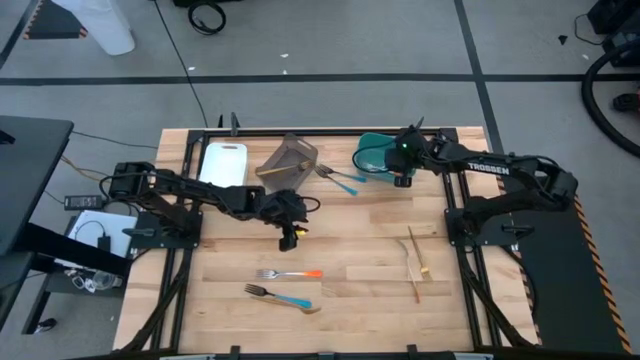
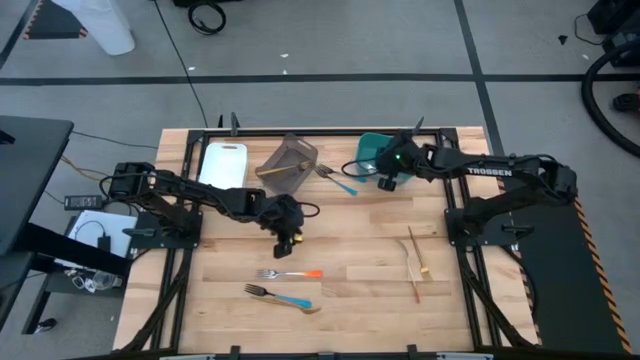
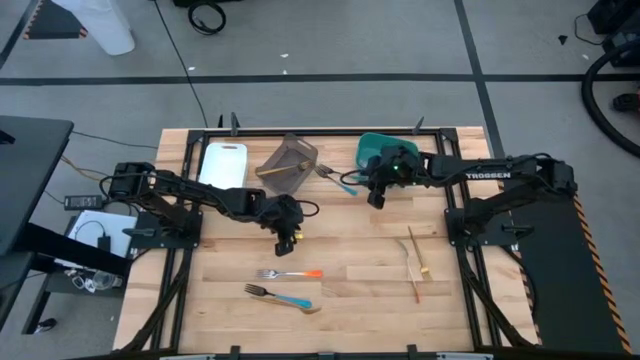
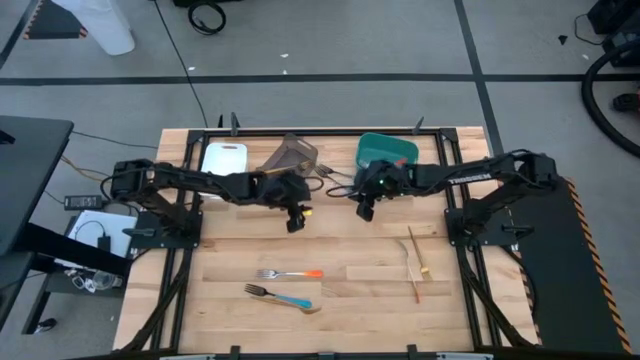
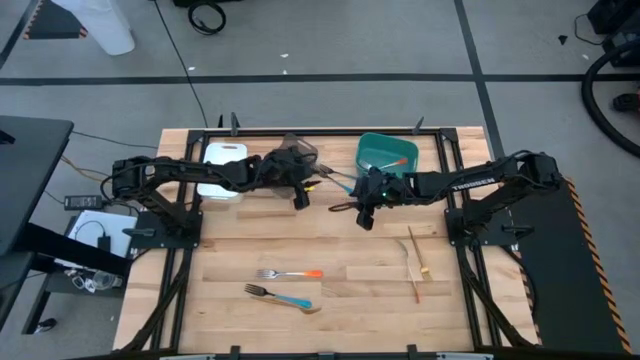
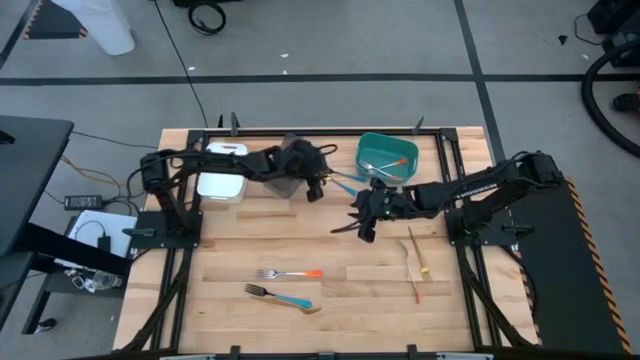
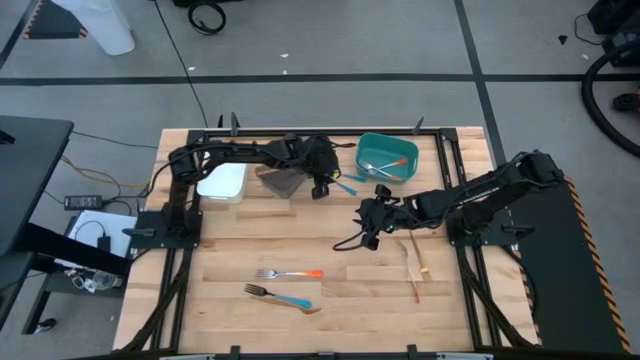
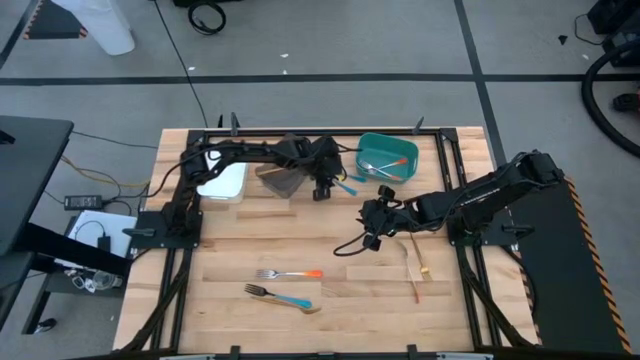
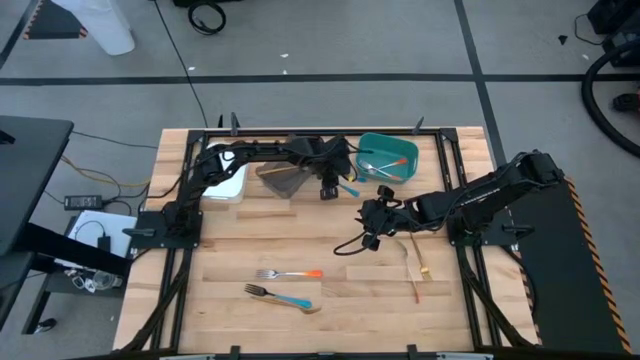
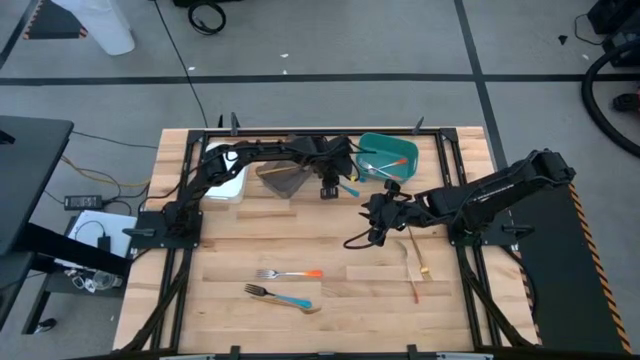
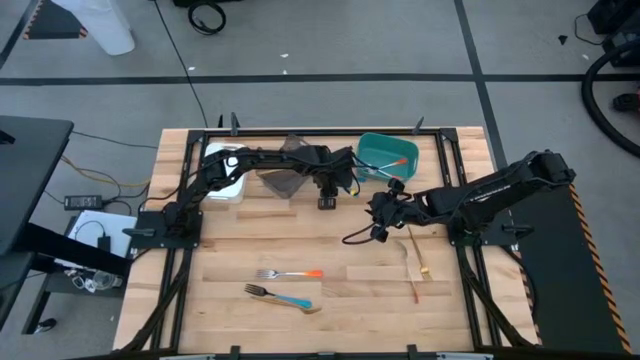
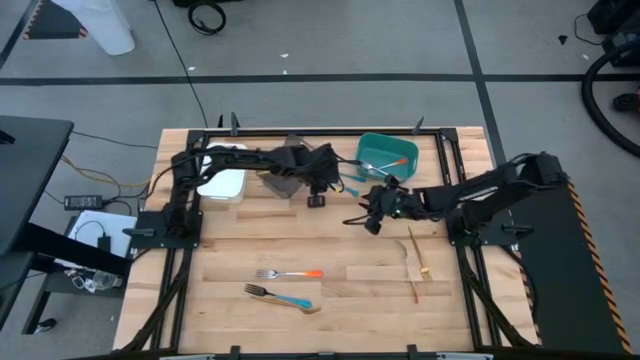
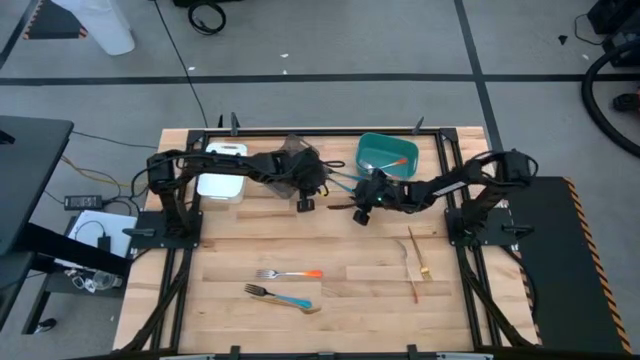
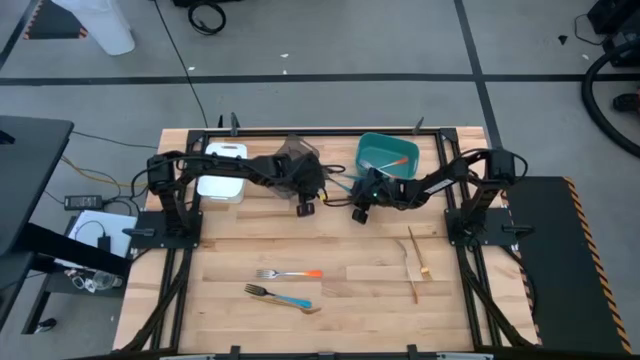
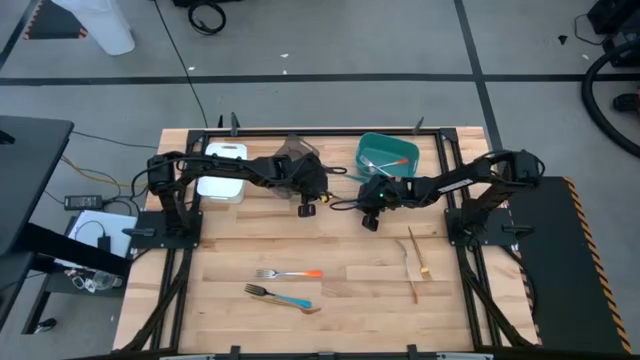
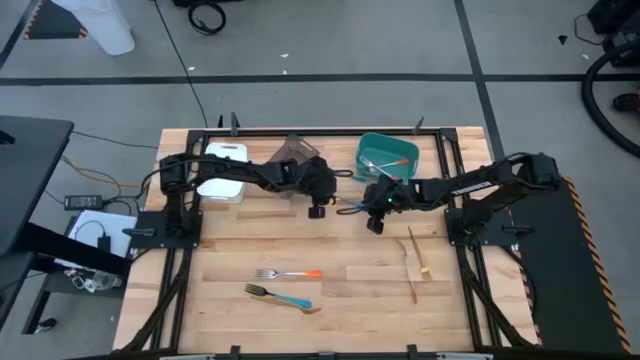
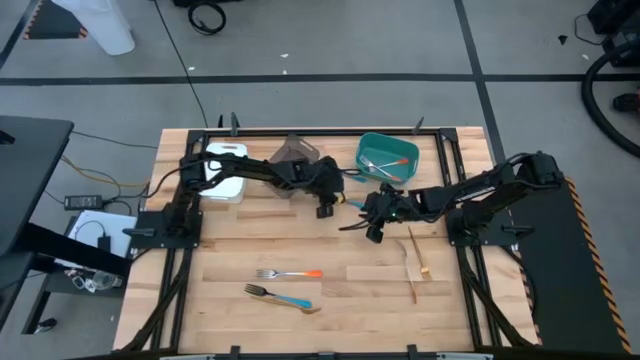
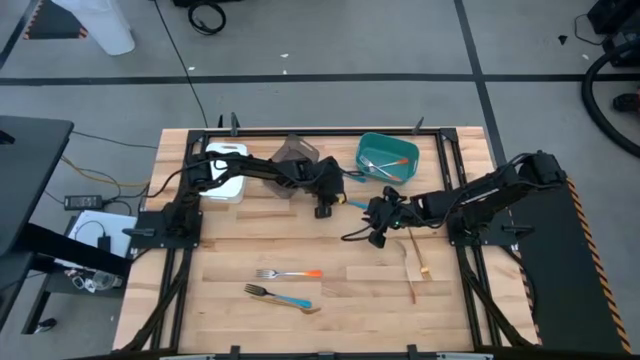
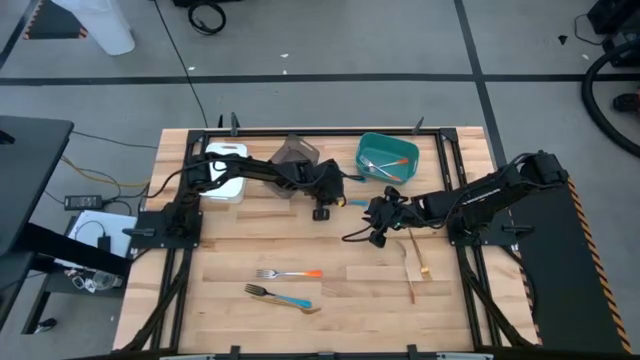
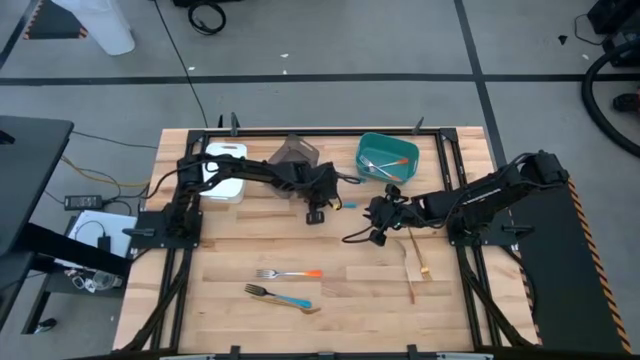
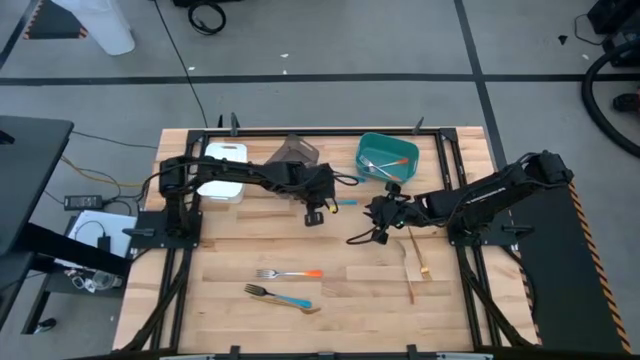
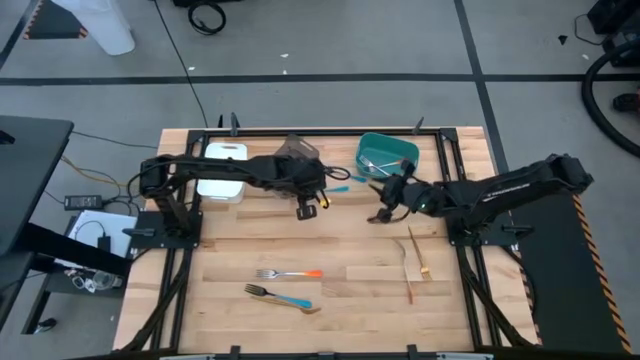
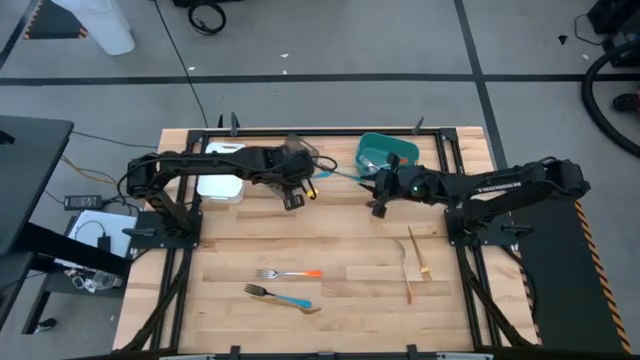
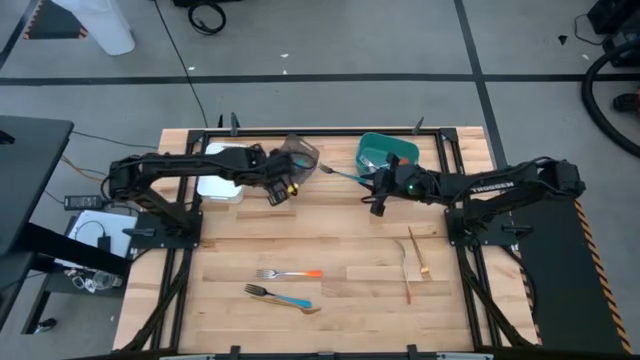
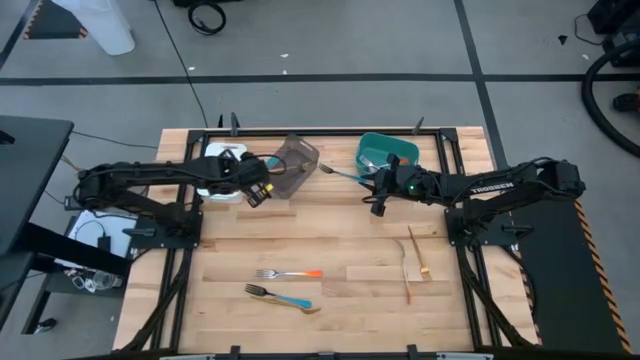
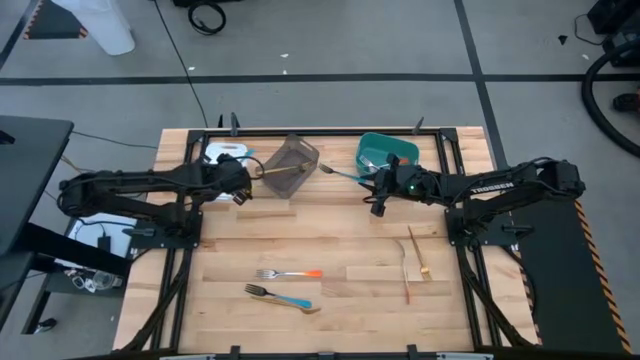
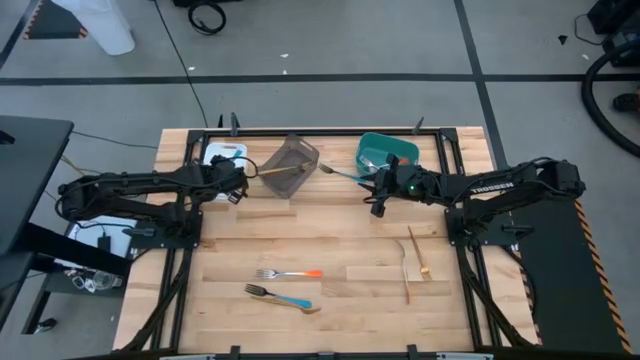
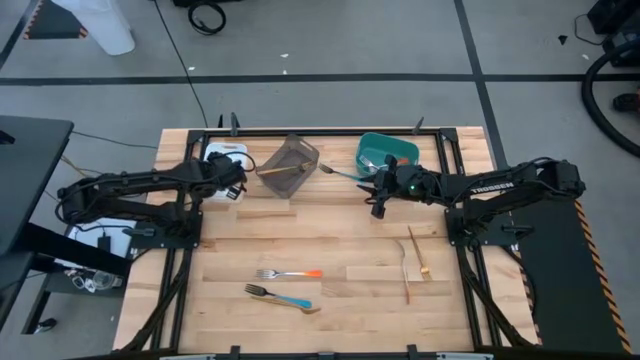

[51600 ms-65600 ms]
Task: Sort silverware by color (type)
Put the middle blue fork into the white bin

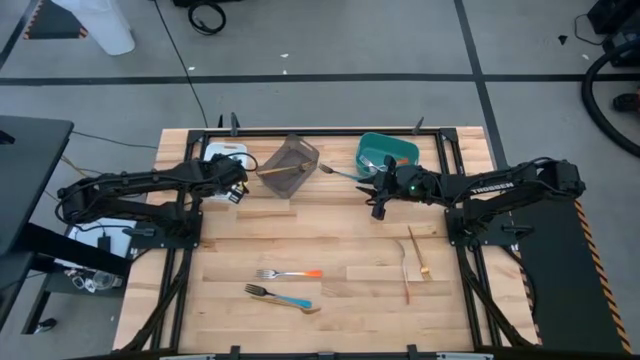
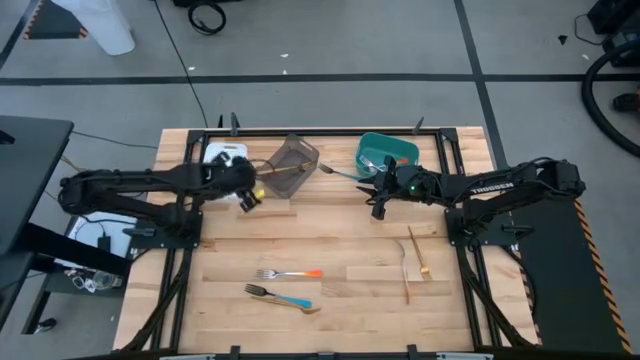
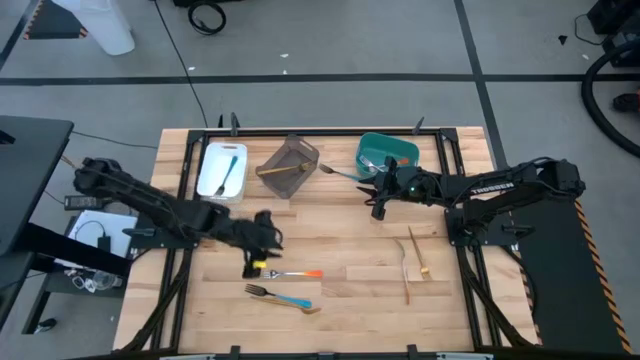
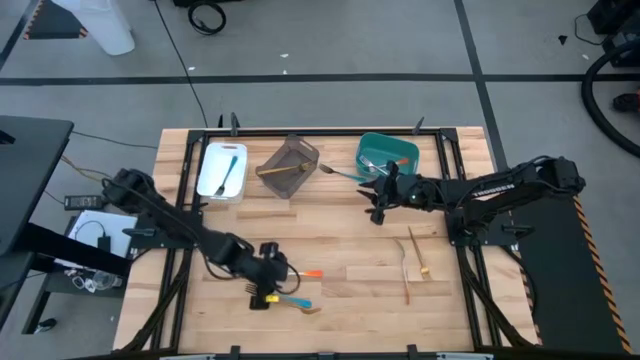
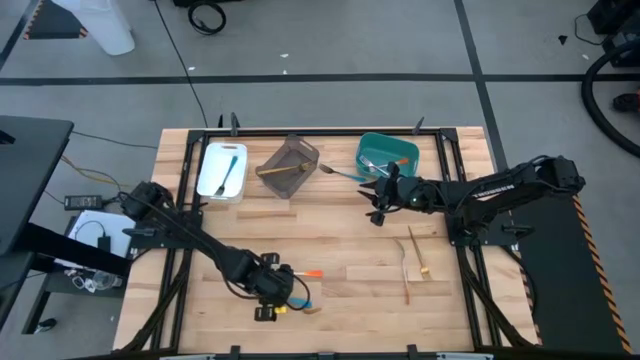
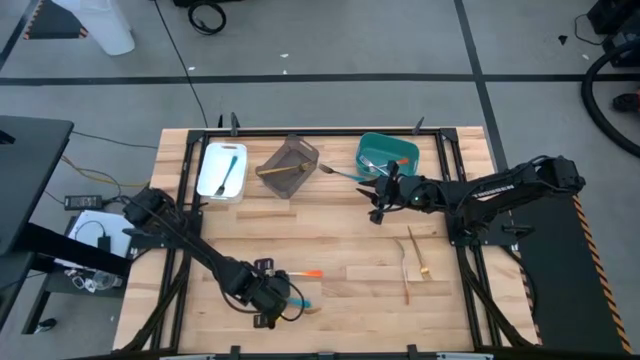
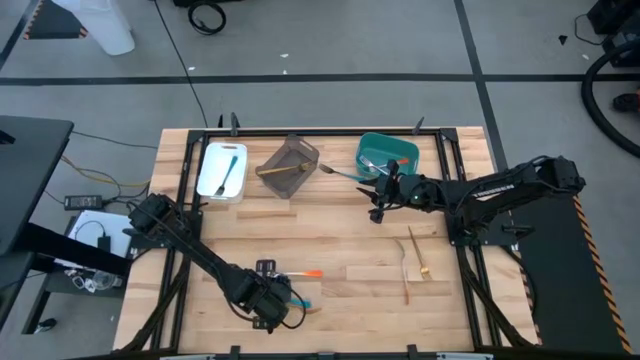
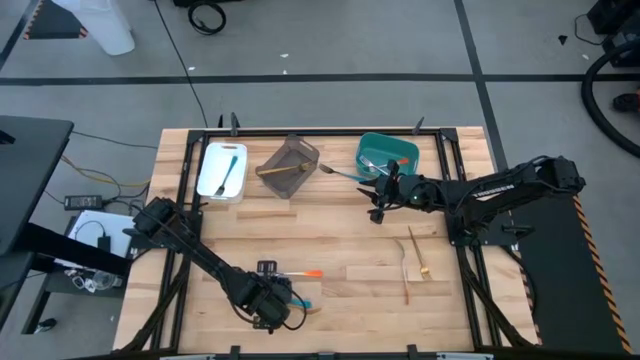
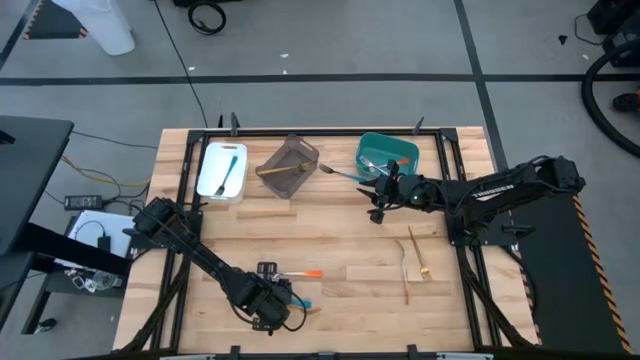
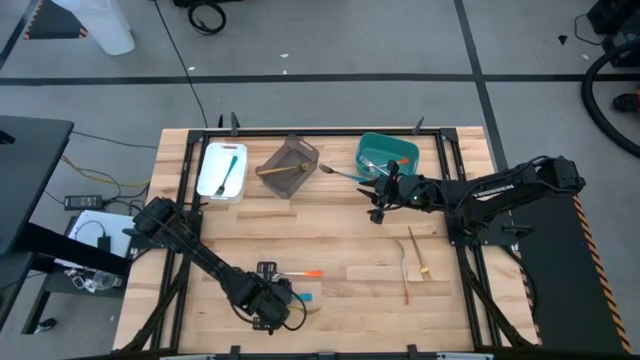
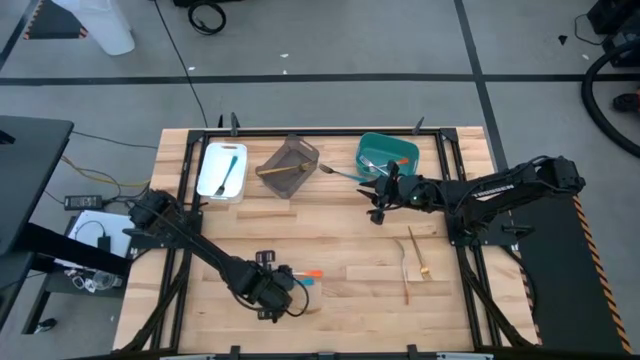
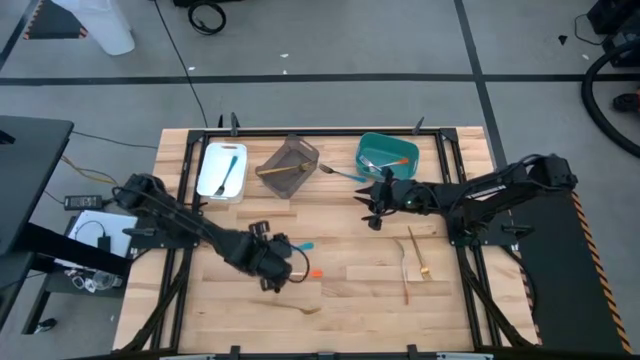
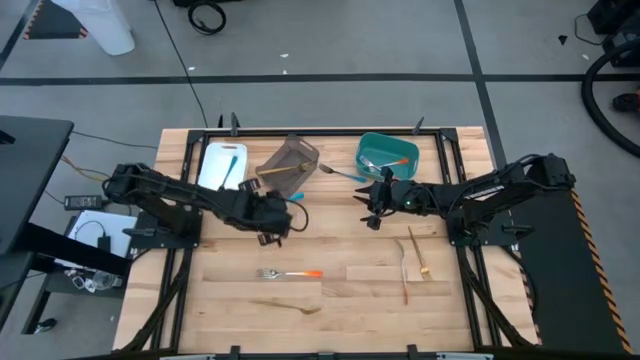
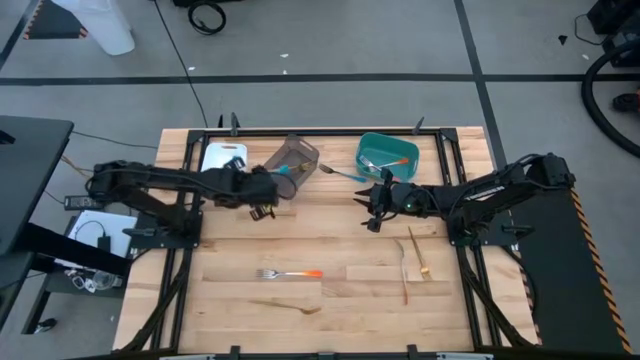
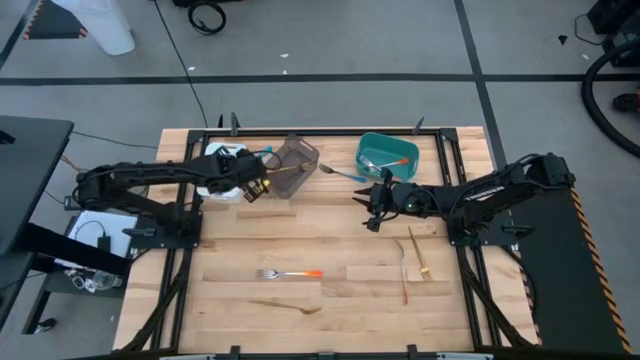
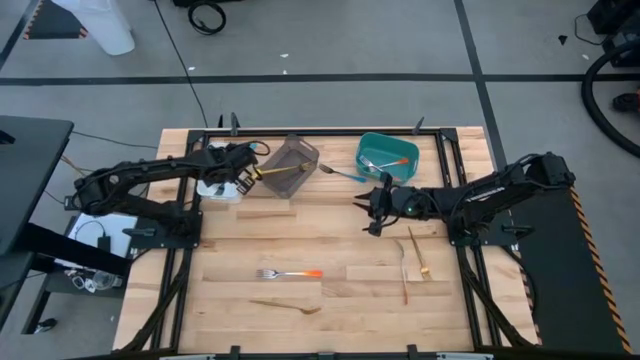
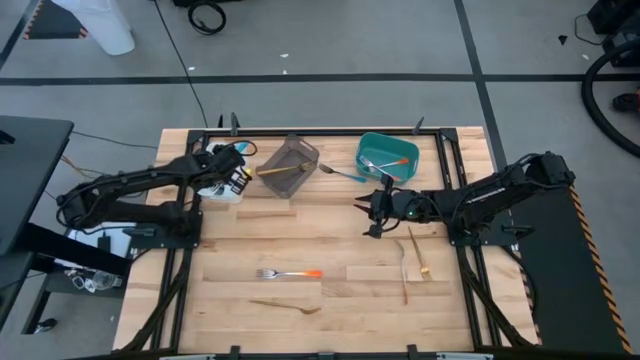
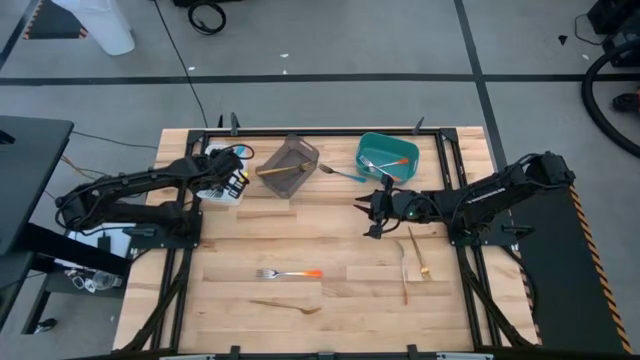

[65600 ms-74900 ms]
Put the bottom blue fork into the white bin
